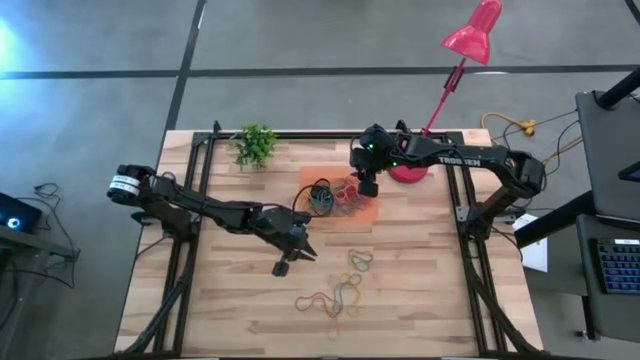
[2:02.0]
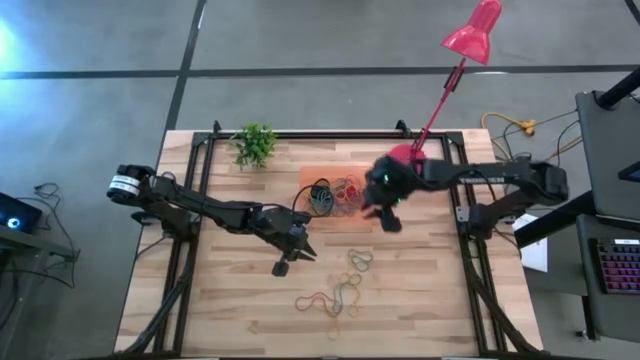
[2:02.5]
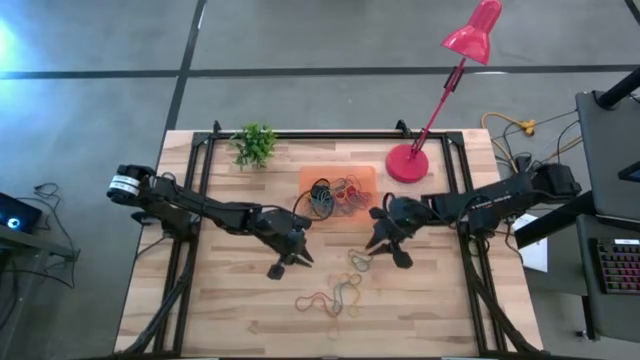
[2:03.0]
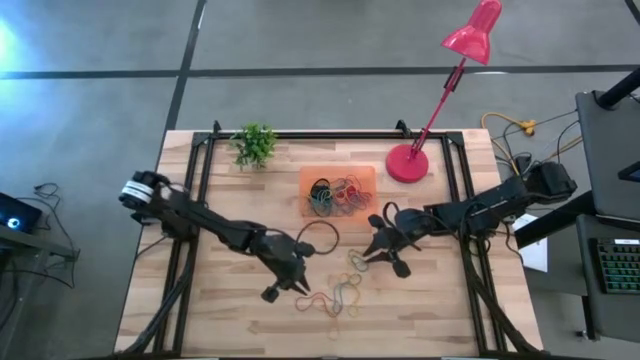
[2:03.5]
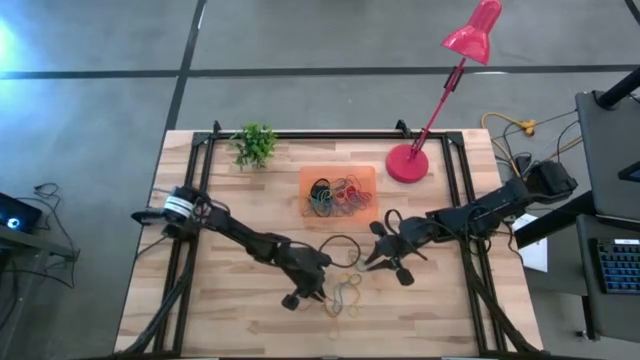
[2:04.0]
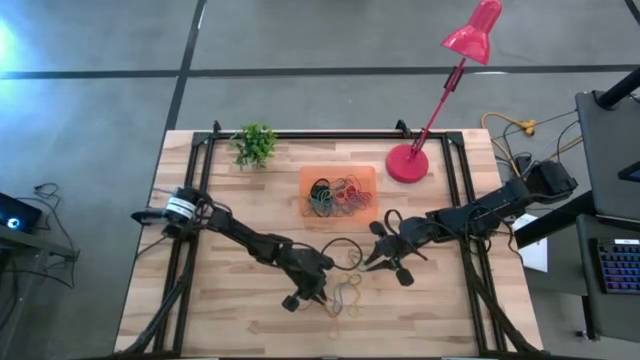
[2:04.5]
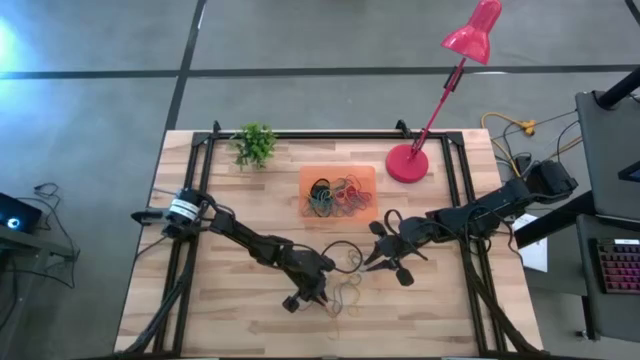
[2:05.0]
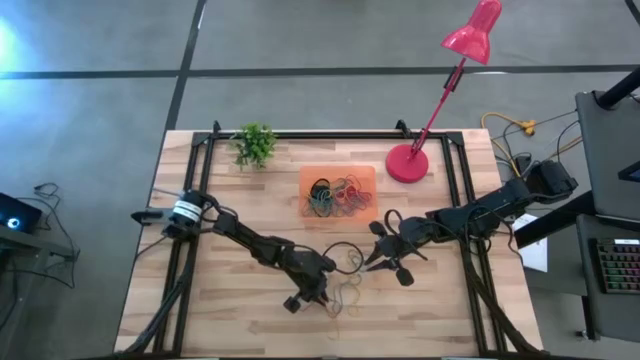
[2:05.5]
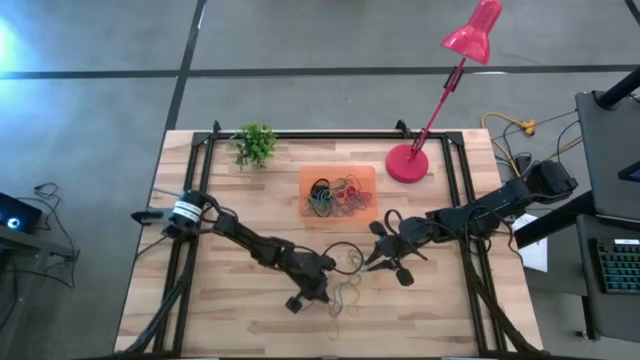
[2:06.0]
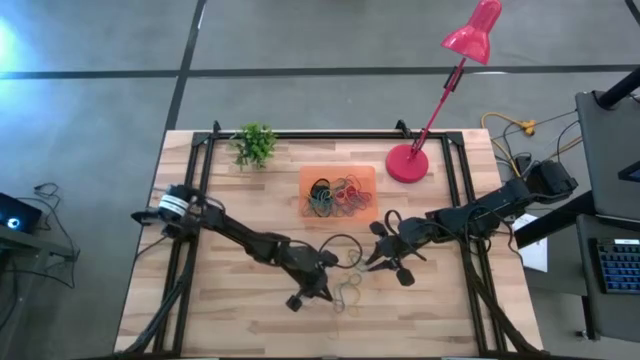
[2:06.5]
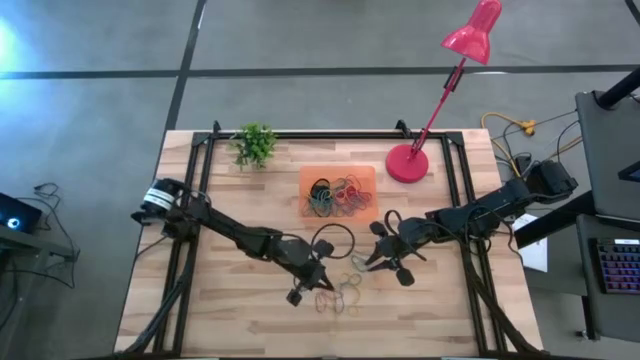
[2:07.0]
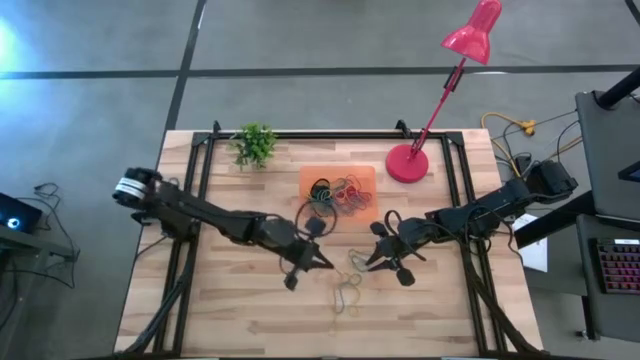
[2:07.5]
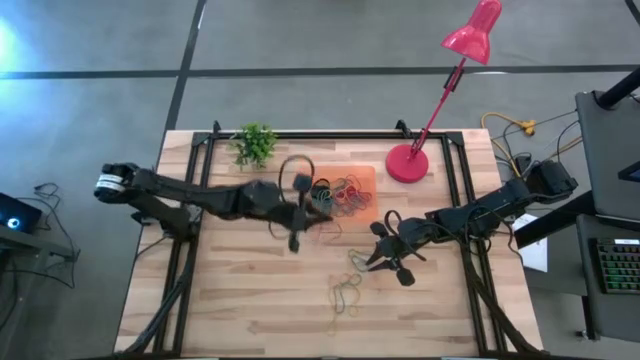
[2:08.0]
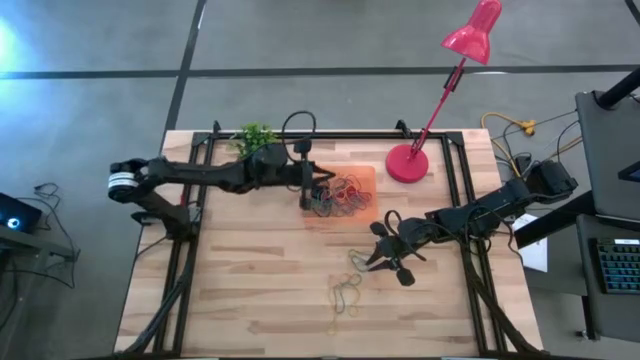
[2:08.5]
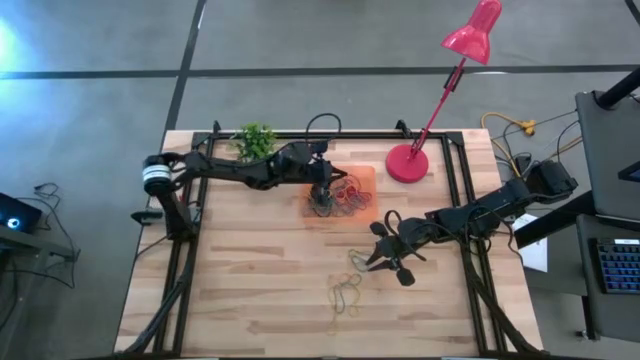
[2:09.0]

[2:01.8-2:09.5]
Task: Pick and place rubber bands into bin
Put the red rubber band into the bin

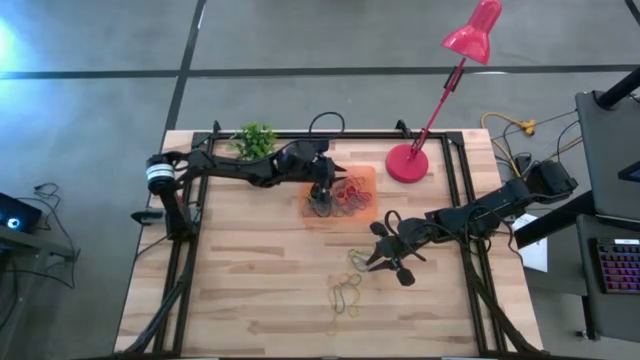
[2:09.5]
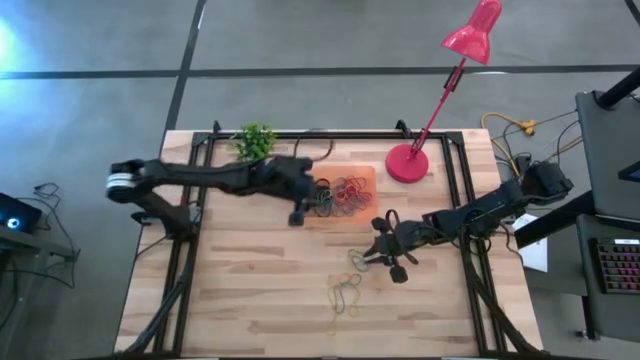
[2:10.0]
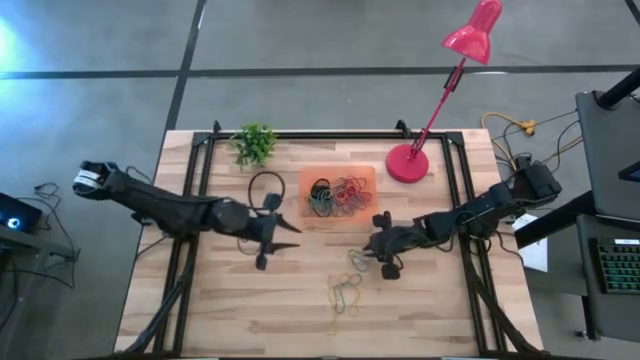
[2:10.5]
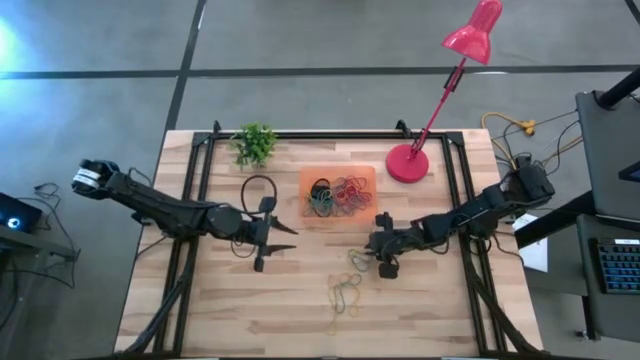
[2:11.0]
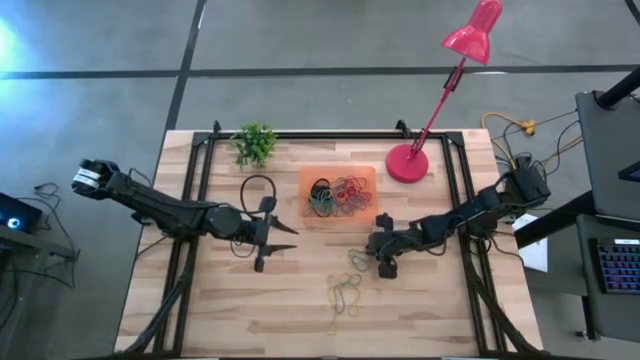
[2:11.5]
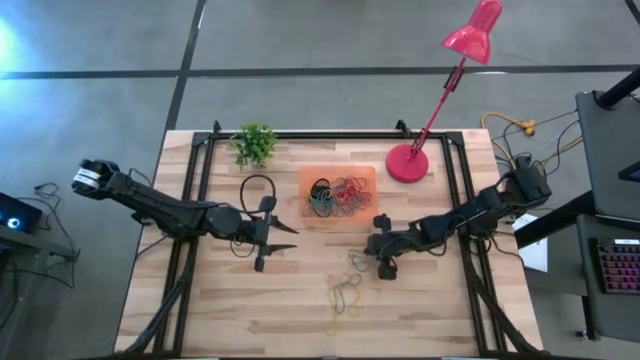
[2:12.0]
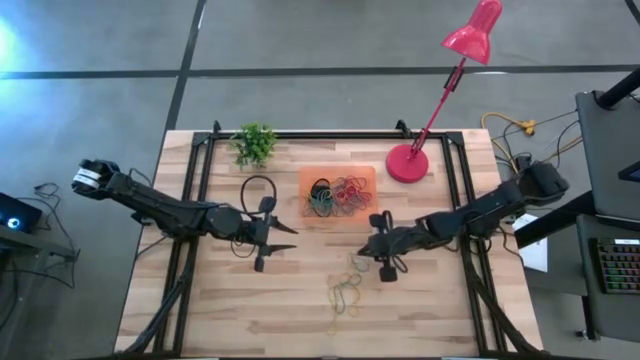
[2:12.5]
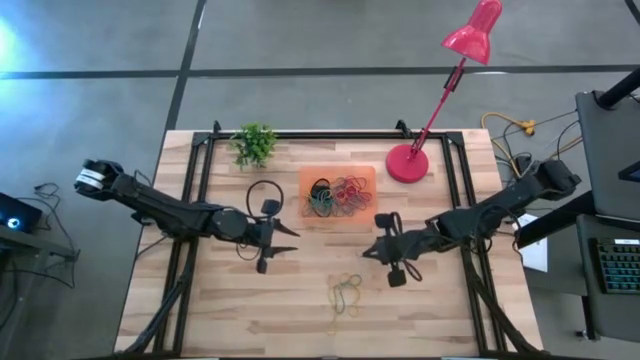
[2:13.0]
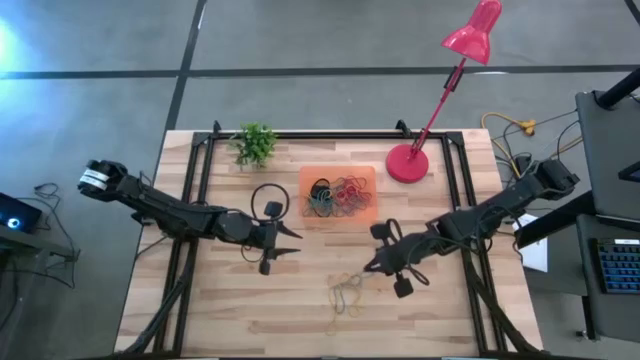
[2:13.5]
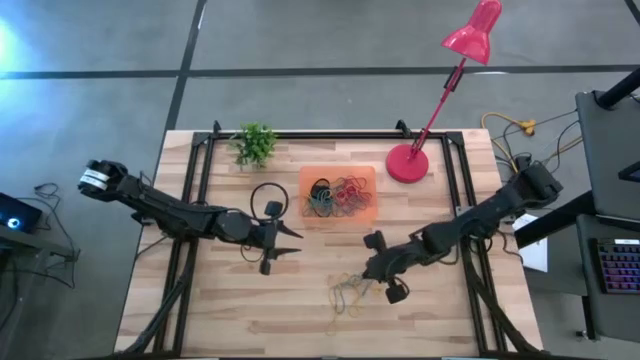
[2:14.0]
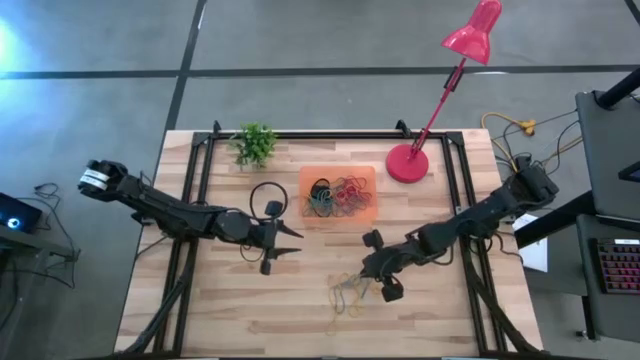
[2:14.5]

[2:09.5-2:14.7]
Put the top yellow rubber band into the bin

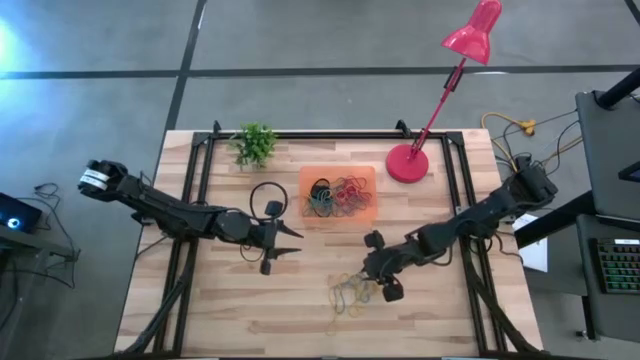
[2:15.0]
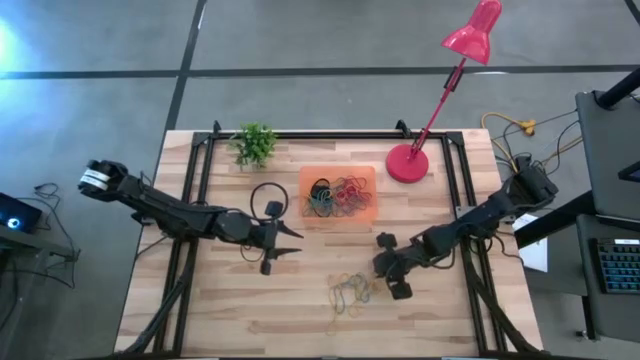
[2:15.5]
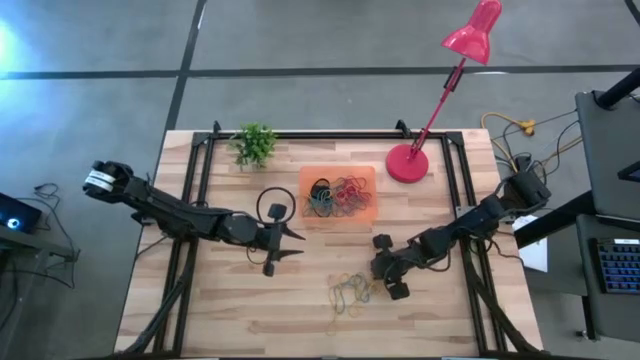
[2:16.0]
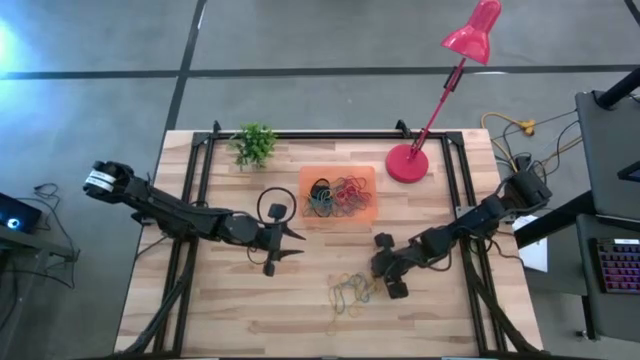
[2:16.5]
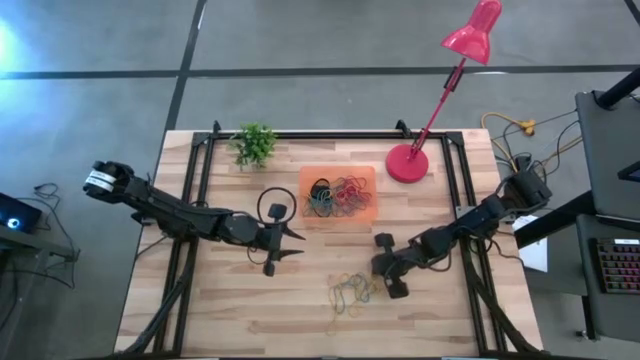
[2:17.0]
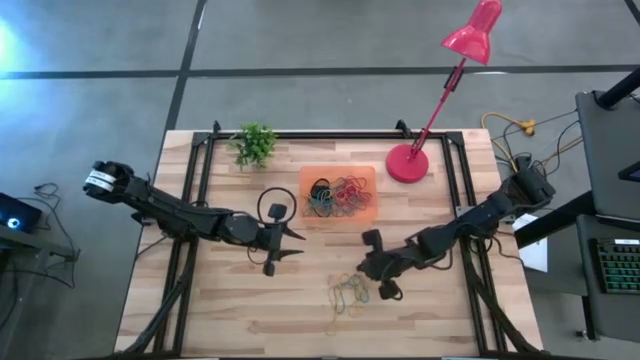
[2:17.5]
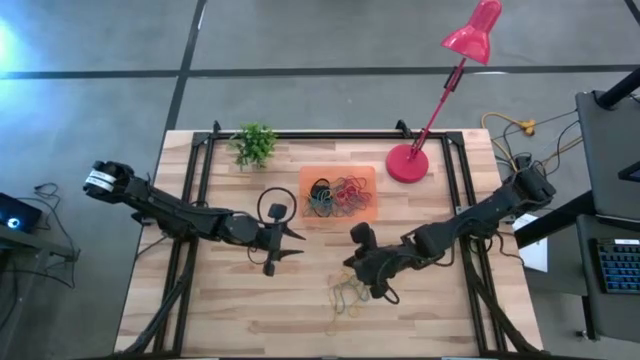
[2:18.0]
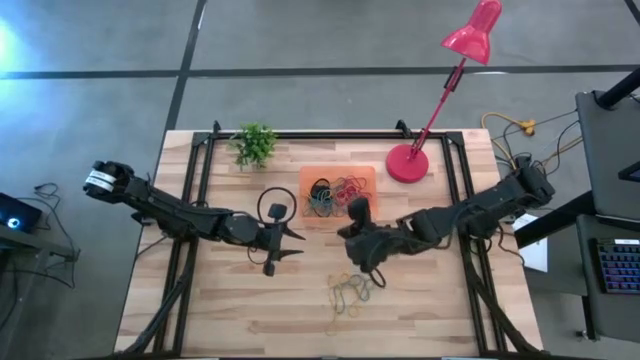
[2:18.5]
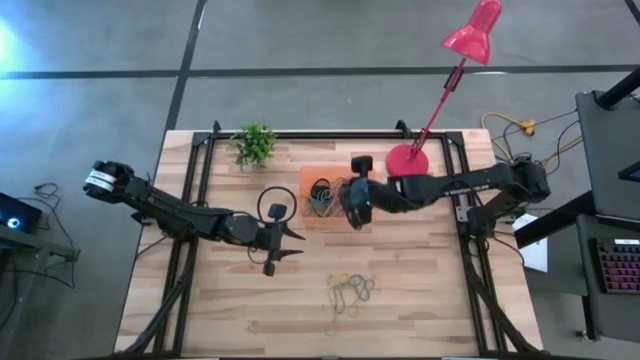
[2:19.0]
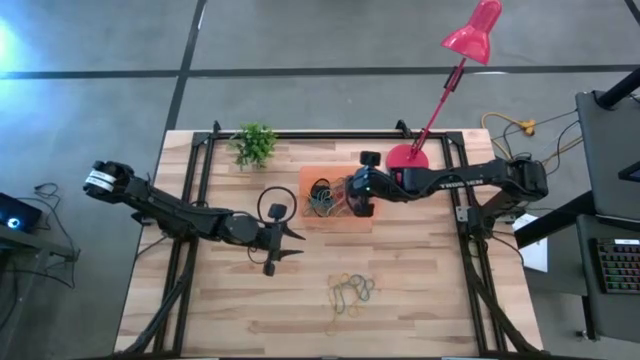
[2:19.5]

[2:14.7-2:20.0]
Put the top yellow rubber band into the bin

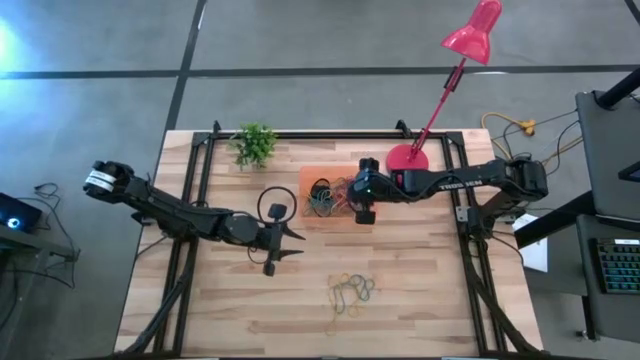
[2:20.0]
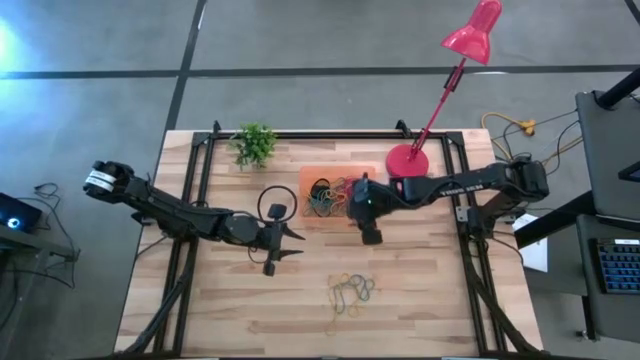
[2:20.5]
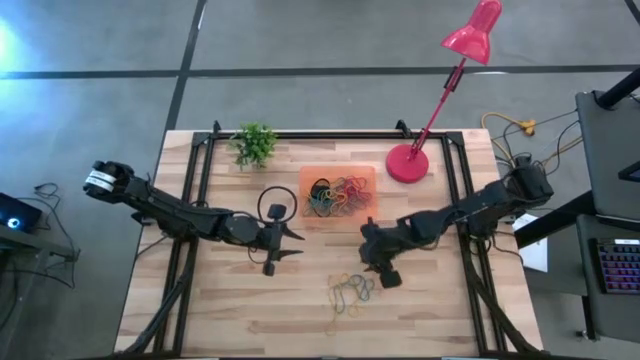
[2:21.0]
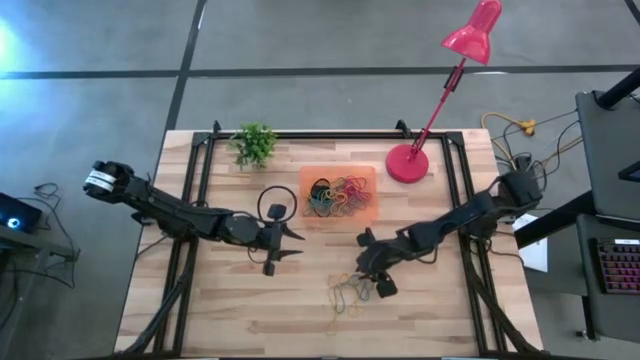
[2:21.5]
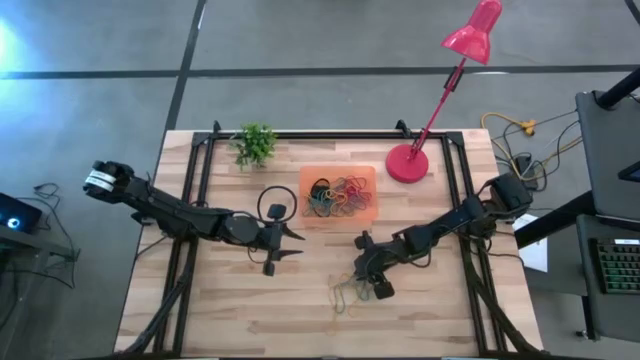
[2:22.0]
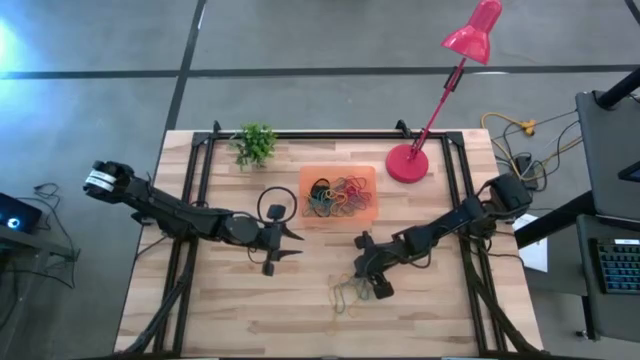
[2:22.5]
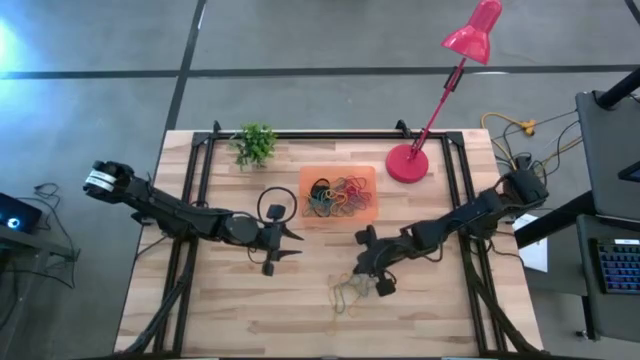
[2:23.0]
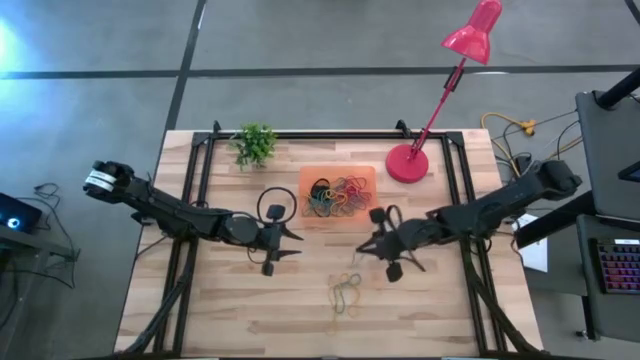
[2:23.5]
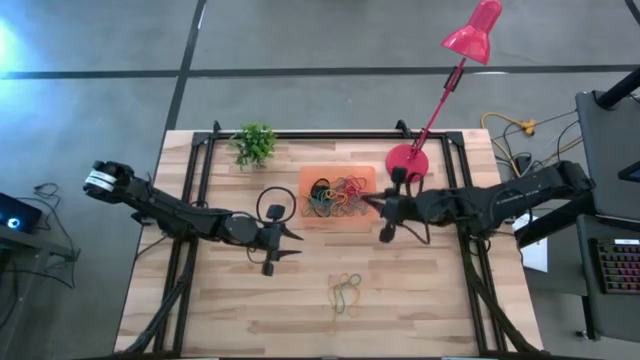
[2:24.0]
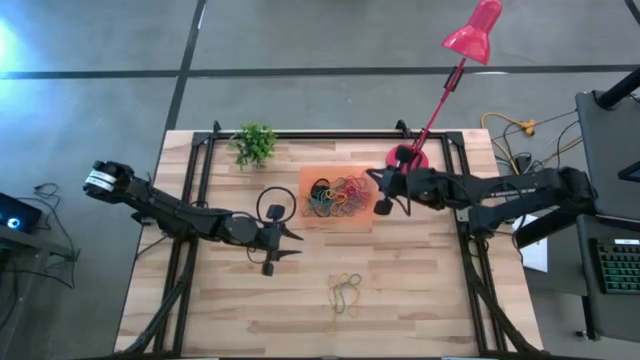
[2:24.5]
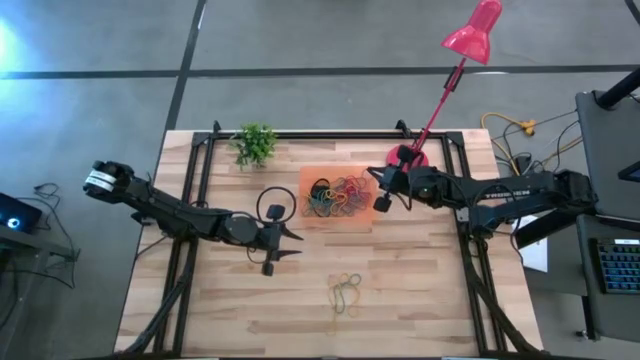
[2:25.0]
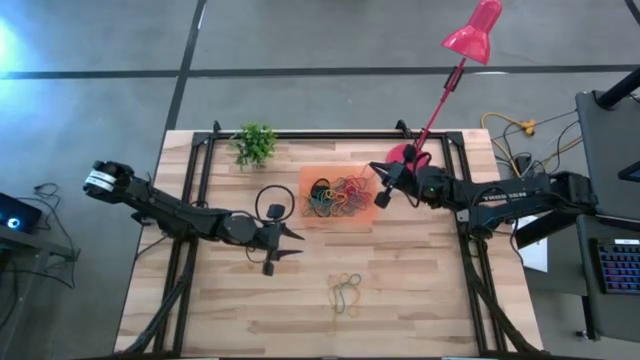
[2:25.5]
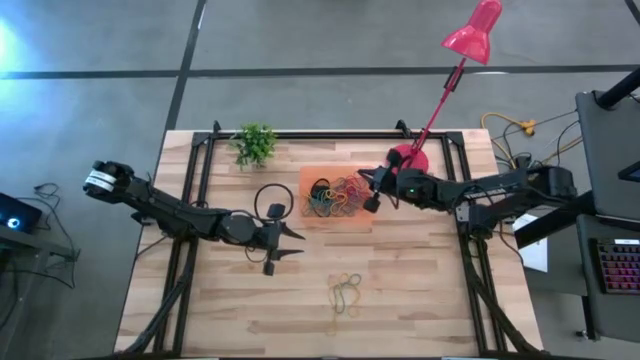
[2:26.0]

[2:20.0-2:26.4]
Put the right blue rubber band into the bin
